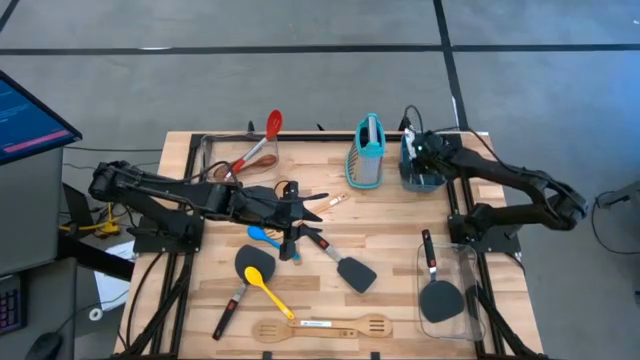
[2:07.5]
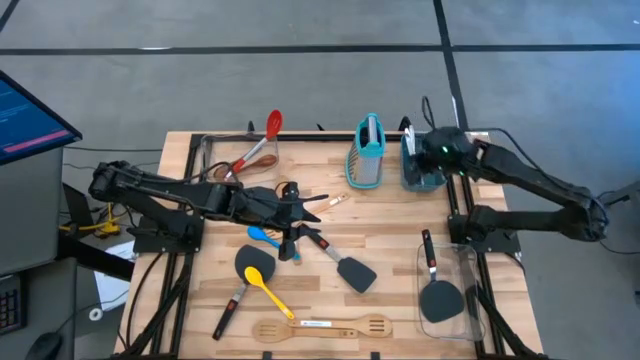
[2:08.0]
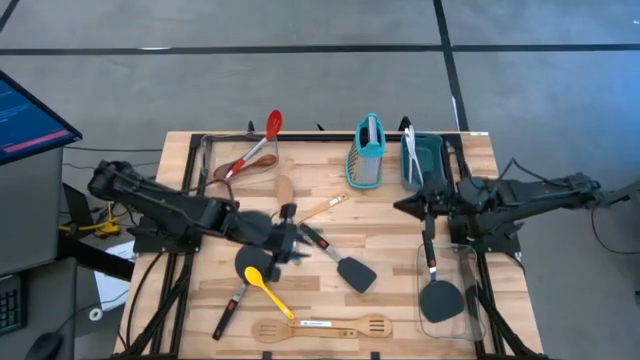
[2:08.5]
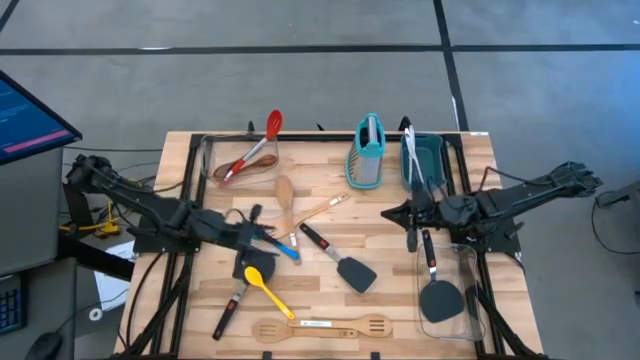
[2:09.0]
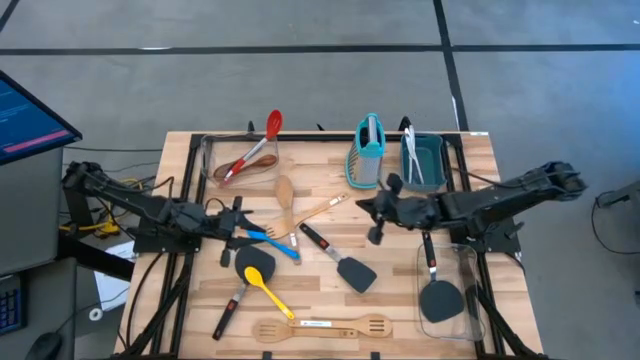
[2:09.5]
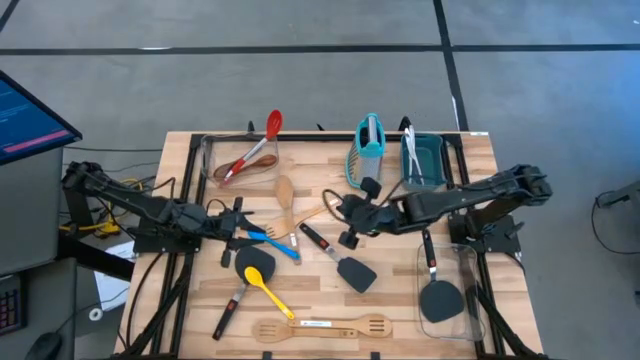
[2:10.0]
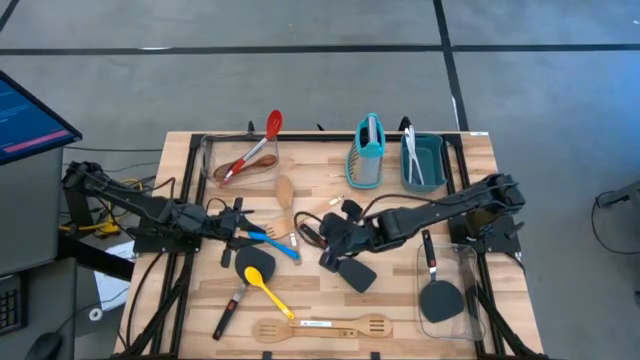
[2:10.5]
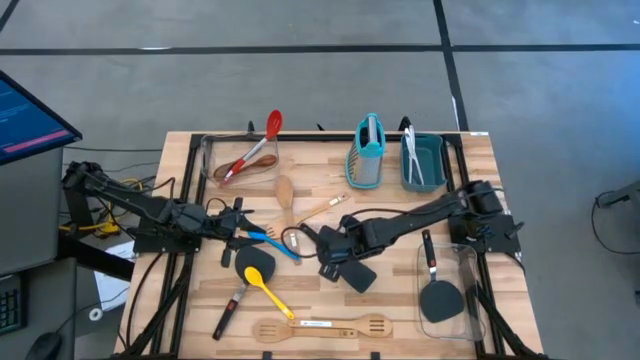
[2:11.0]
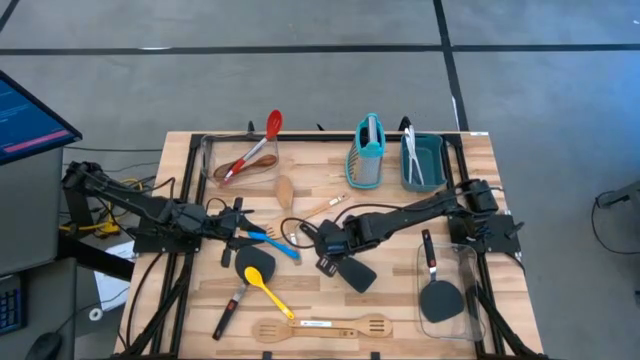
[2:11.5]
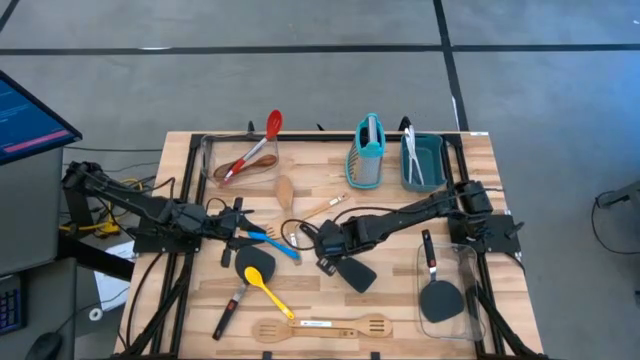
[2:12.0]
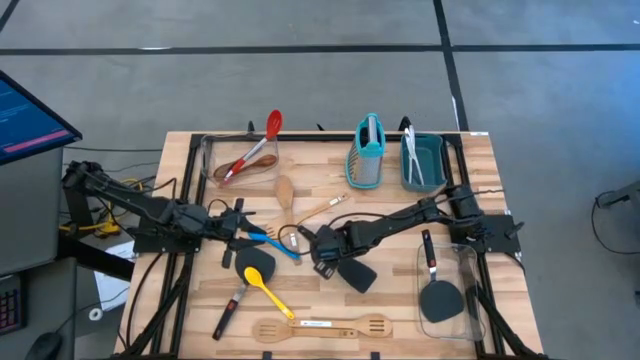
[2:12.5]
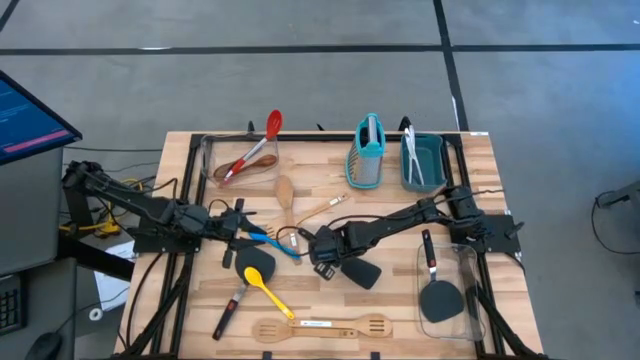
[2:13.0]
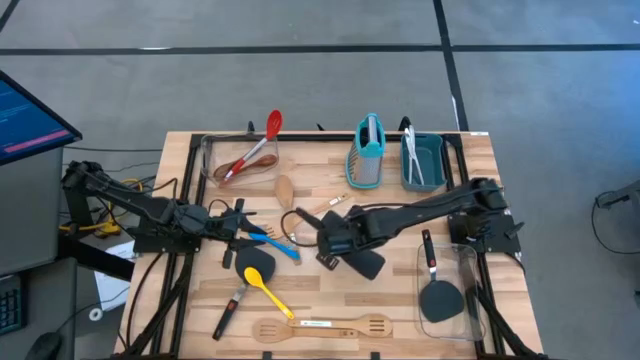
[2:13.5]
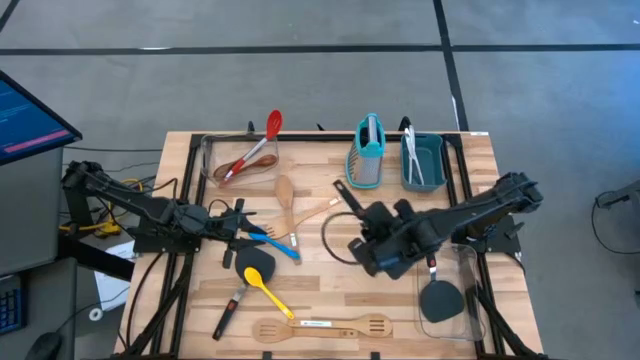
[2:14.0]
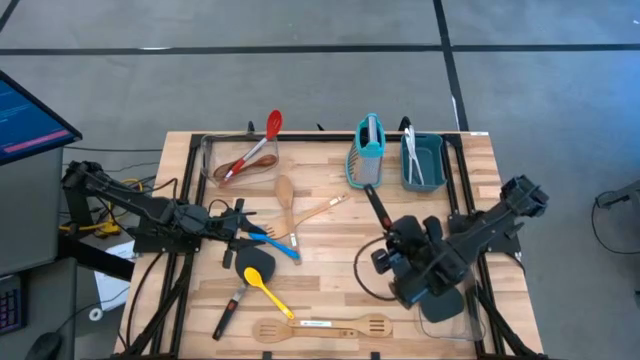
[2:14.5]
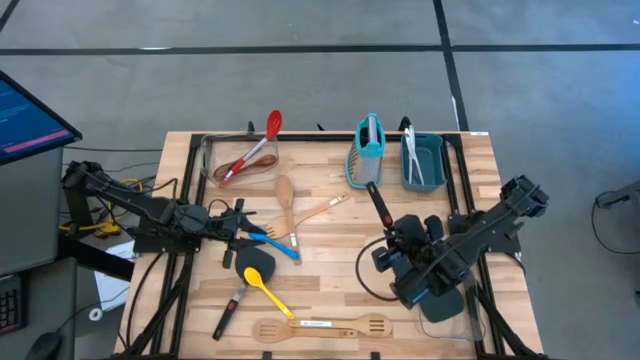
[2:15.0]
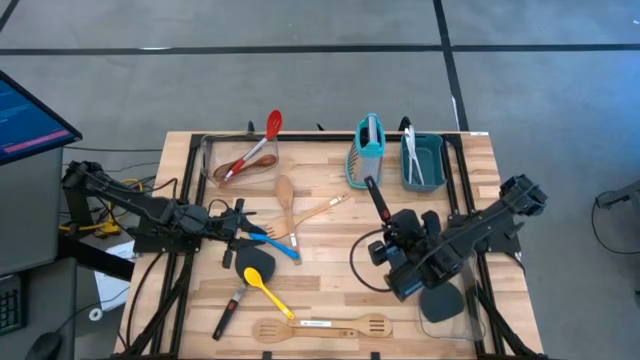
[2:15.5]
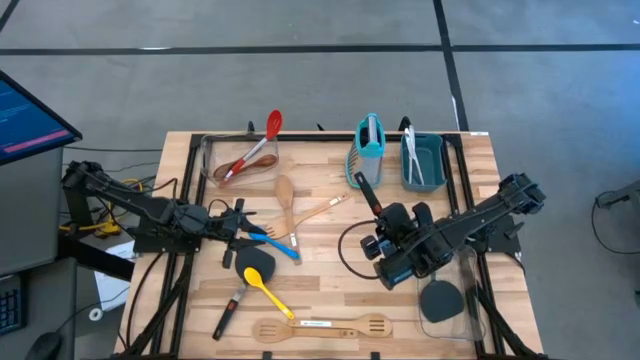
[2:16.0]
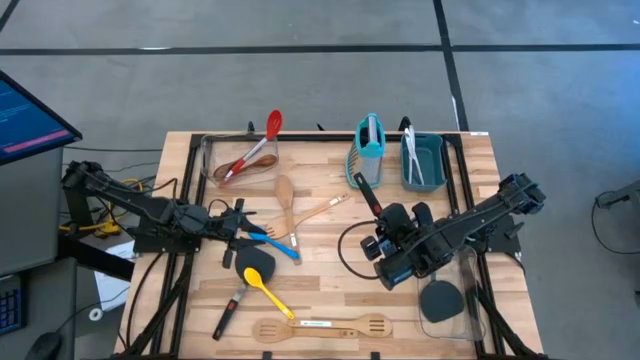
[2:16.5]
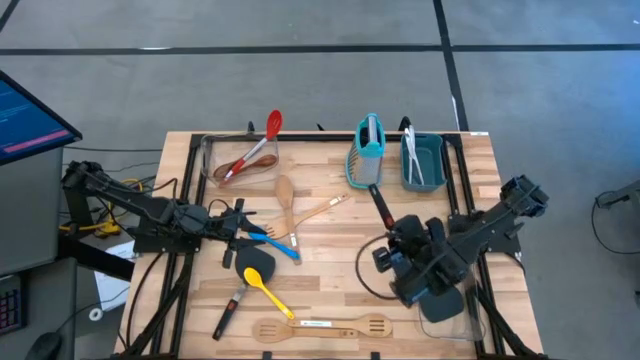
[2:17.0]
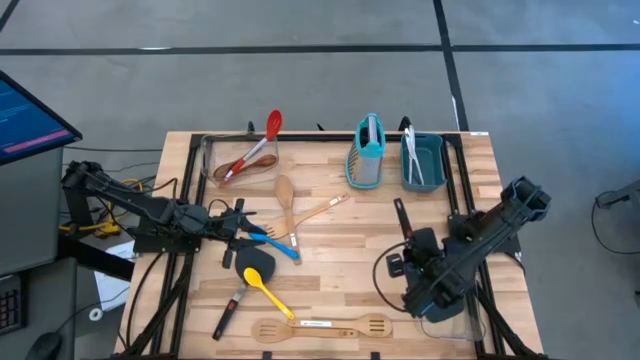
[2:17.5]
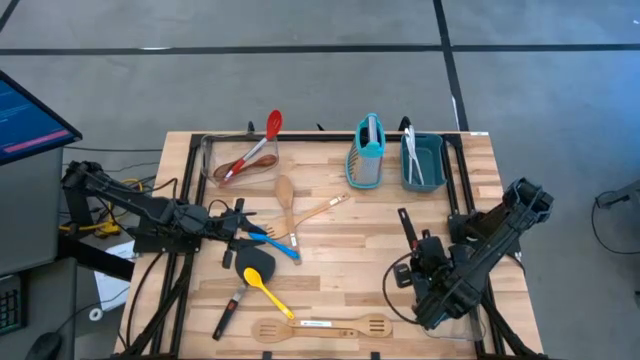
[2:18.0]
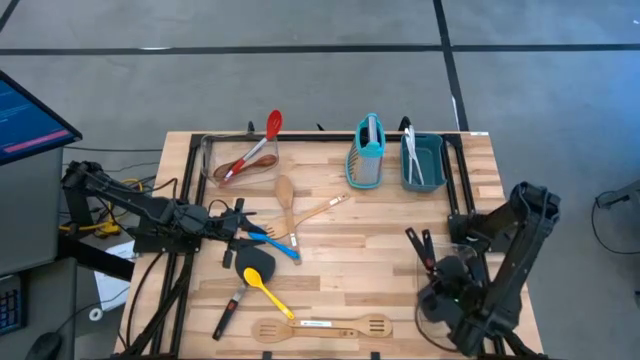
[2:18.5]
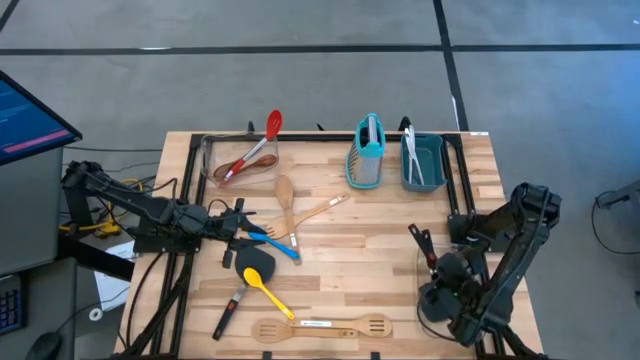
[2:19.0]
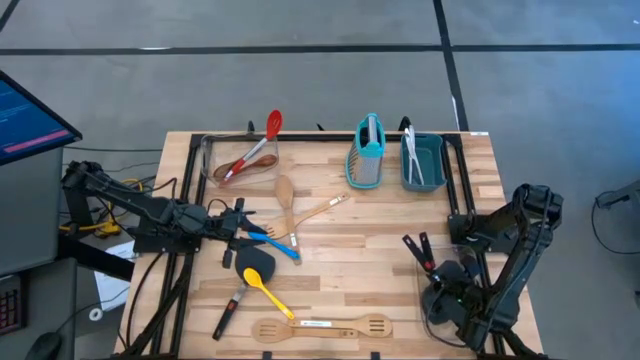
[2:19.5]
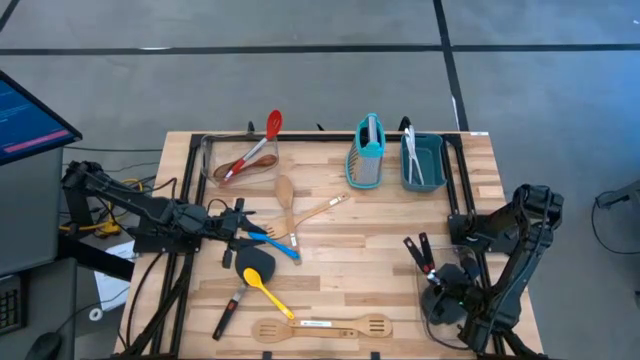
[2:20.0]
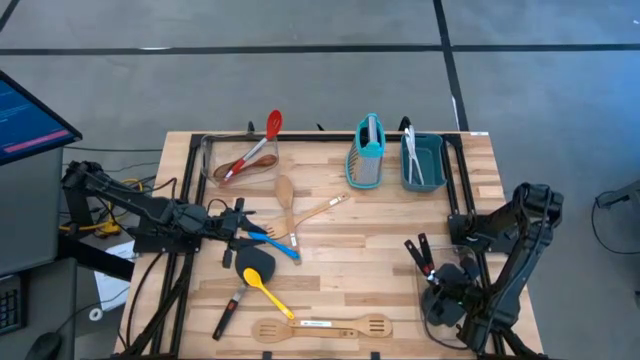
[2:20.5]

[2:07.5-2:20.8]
Task: Pick & Place Kitchen Items
Put the right black turner spatula into the right transparent bin

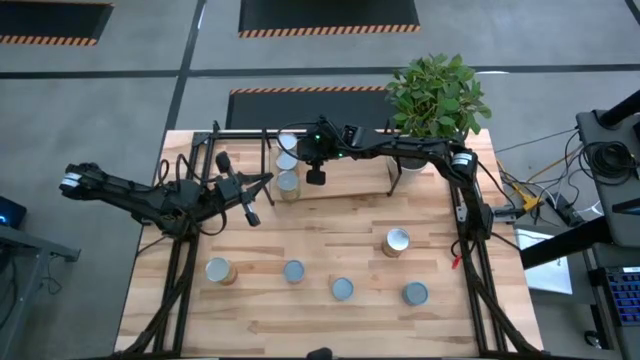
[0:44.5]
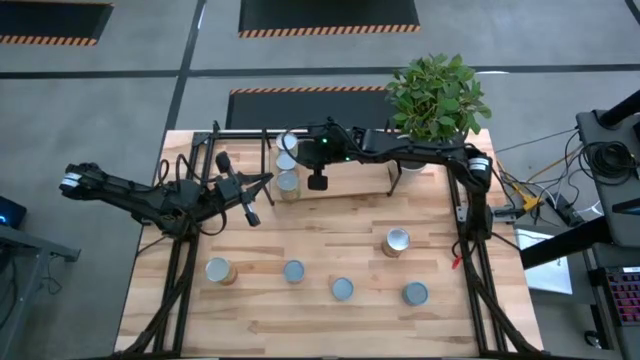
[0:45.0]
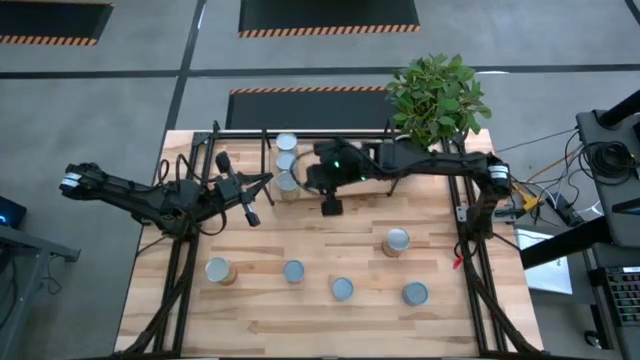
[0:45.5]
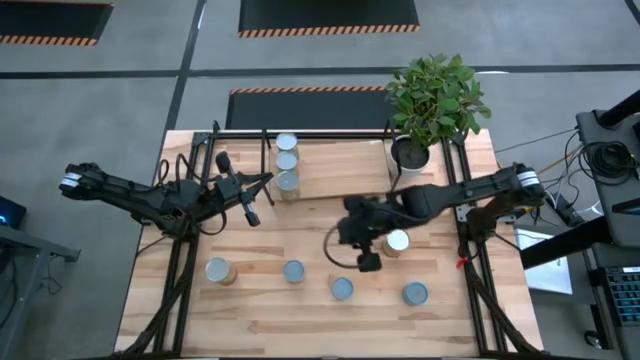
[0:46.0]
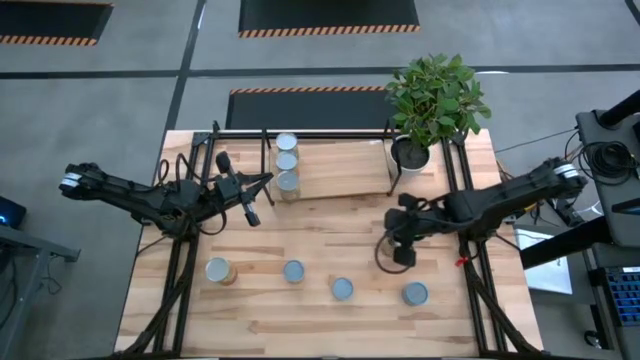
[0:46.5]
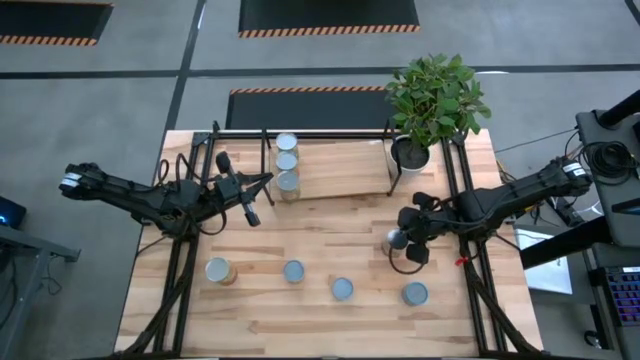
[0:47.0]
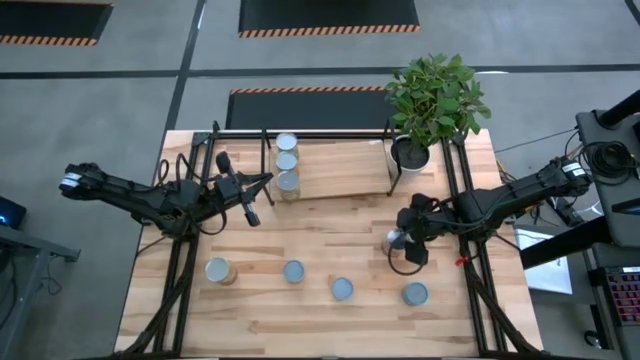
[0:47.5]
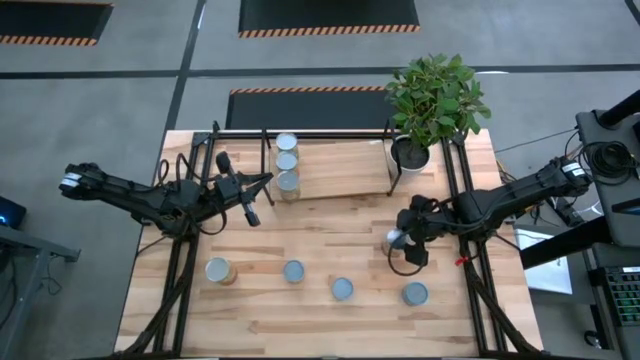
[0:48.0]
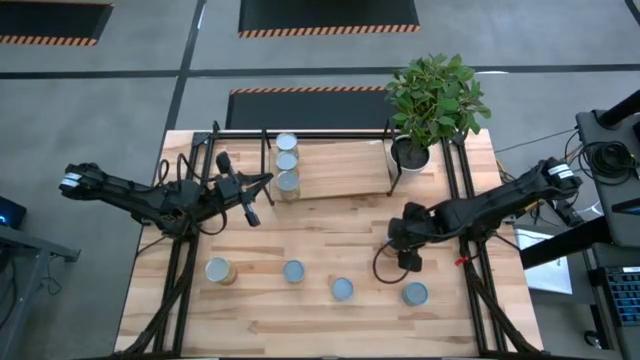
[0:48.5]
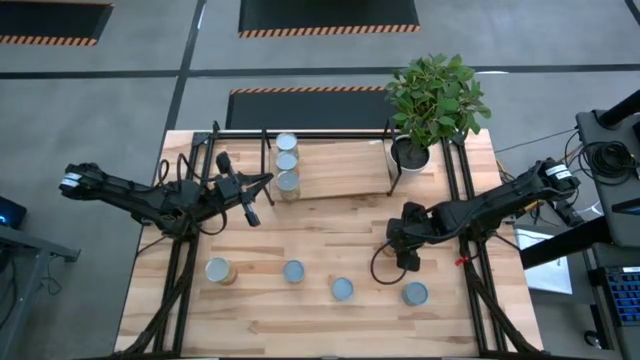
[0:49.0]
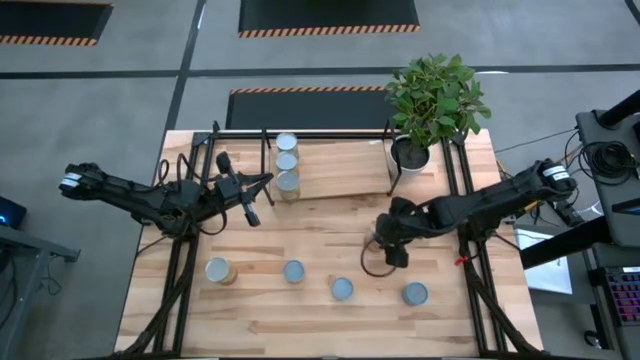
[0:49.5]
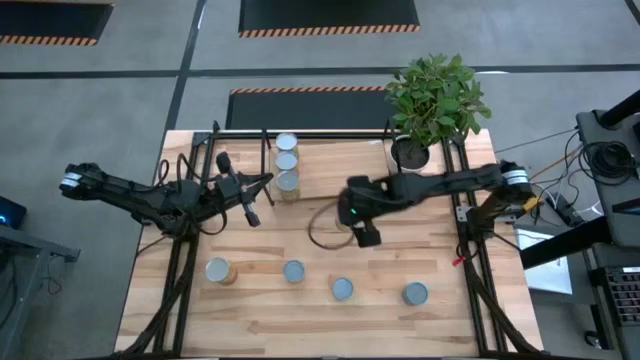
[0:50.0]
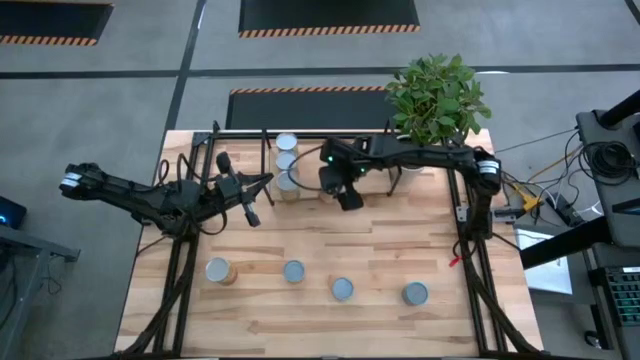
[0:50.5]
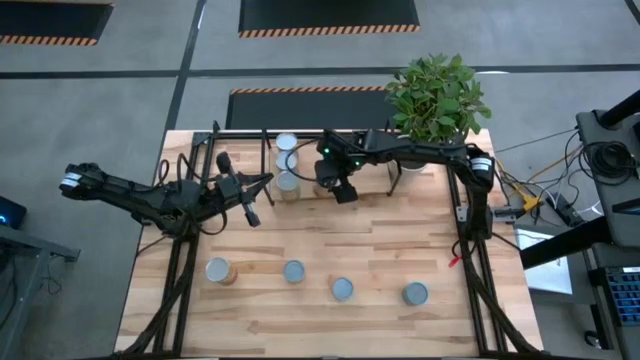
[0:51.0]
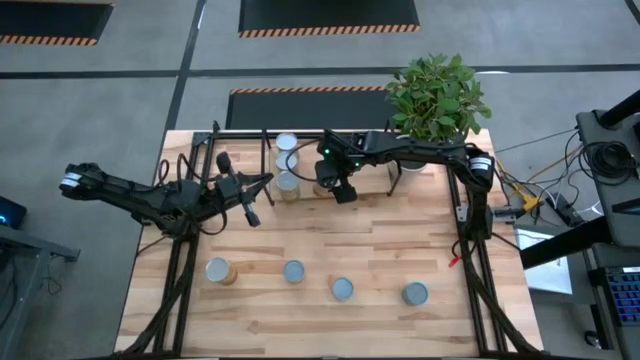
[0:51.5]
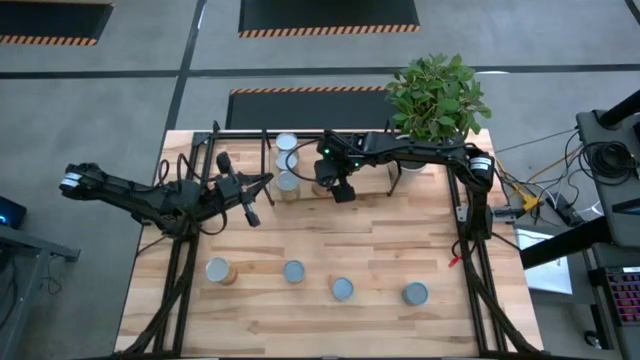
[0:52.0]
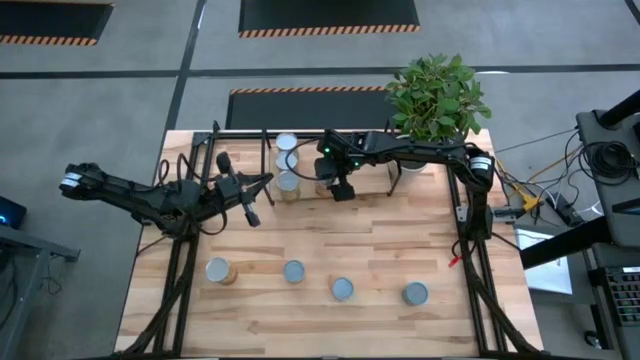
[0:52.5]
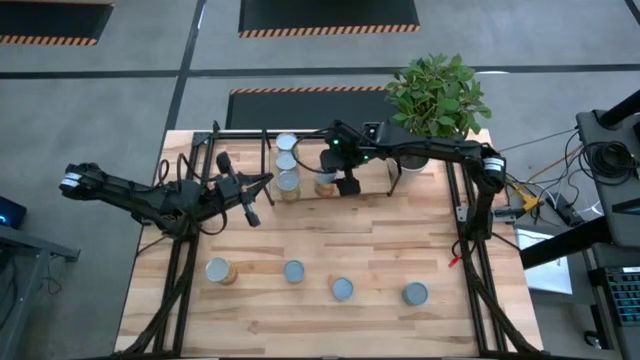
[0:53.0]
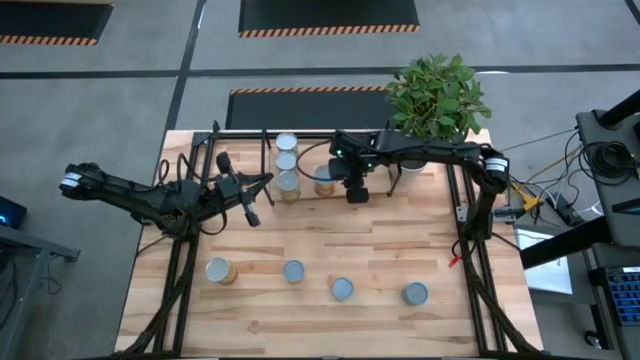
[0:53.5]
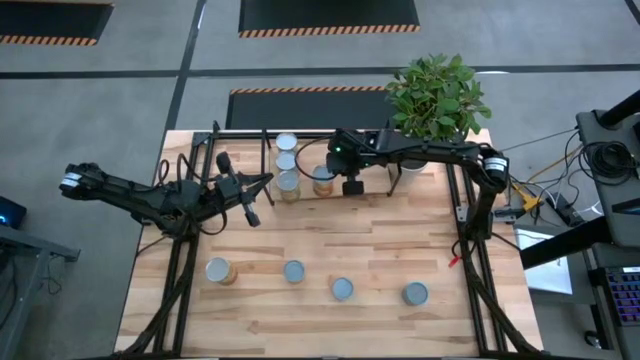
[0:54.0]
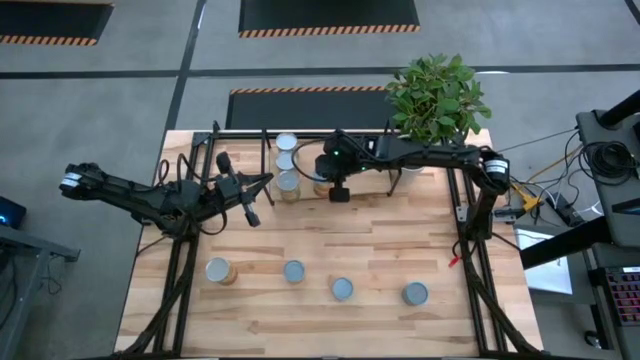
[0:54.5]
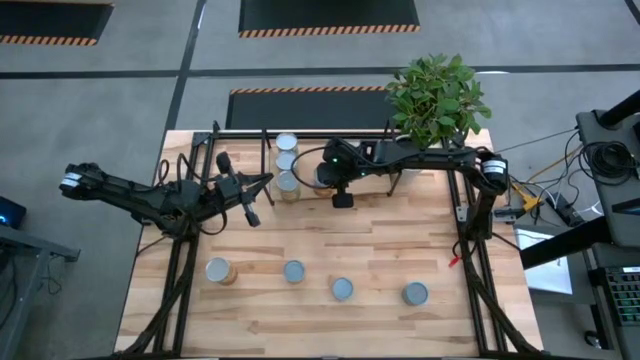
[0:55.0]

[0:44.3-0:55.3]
Task: Pick and place cans onto a shelf
Put the right canned corn on the shelf
